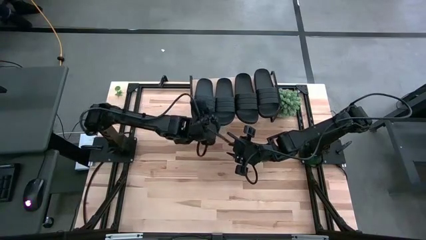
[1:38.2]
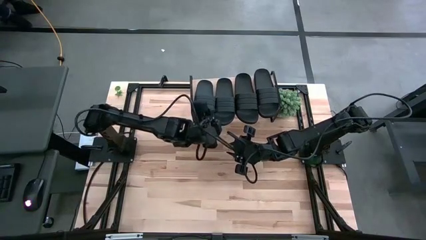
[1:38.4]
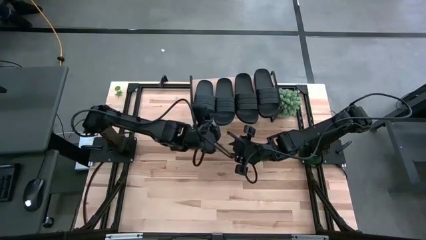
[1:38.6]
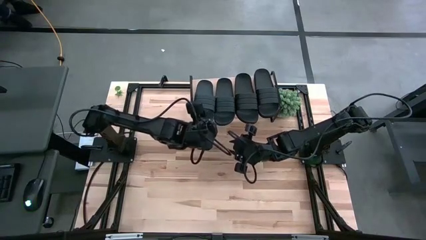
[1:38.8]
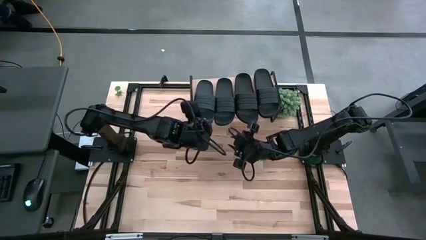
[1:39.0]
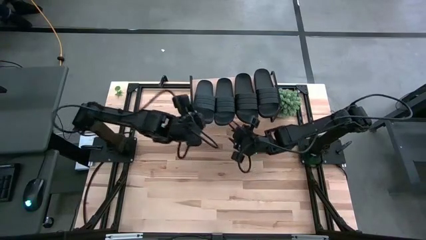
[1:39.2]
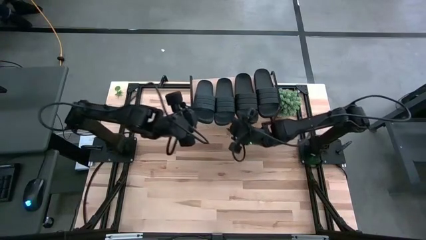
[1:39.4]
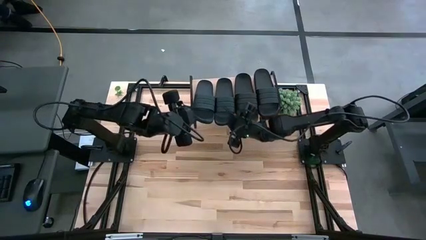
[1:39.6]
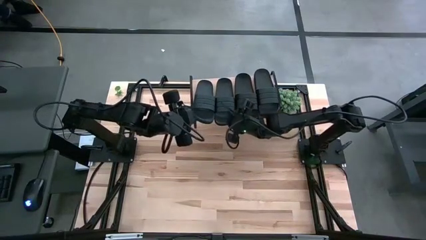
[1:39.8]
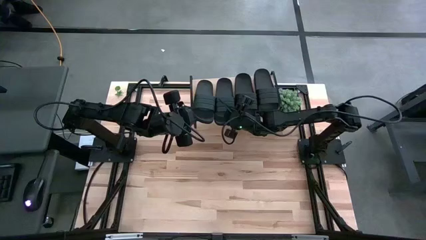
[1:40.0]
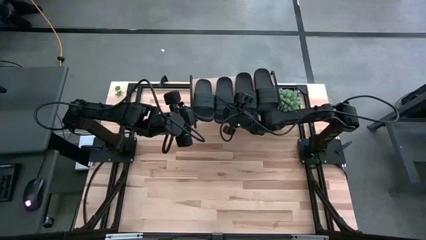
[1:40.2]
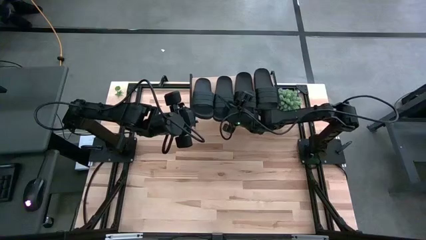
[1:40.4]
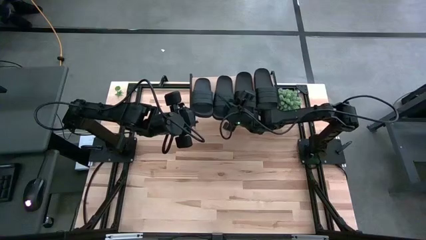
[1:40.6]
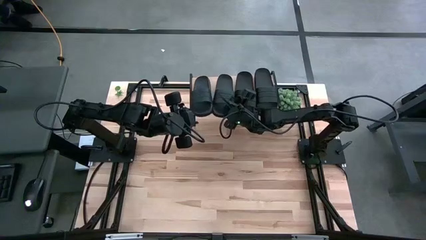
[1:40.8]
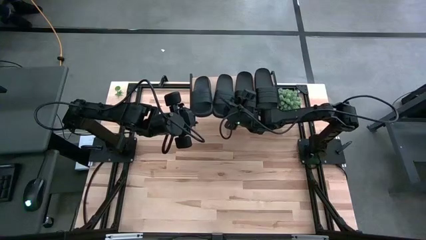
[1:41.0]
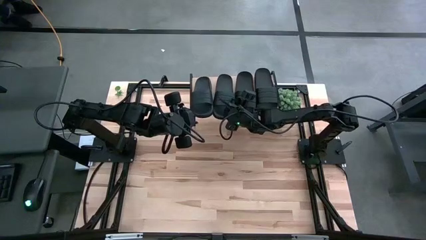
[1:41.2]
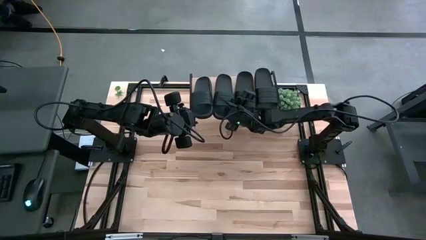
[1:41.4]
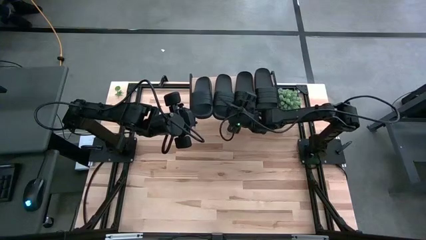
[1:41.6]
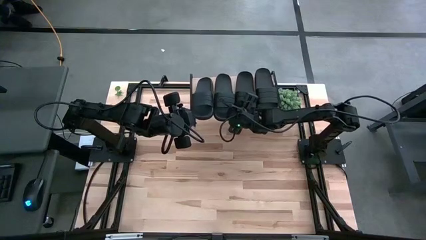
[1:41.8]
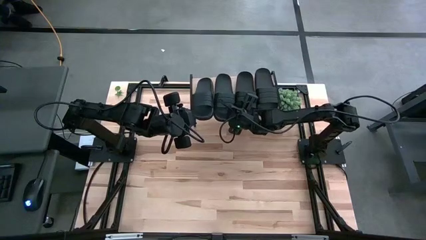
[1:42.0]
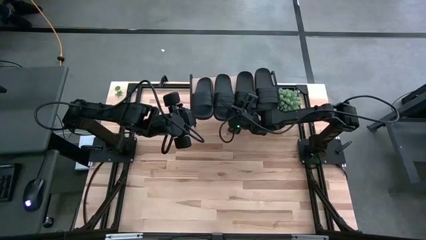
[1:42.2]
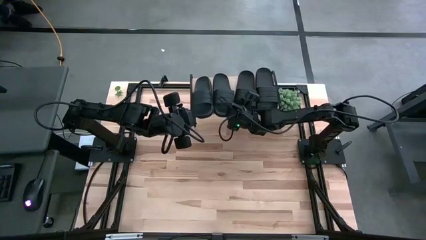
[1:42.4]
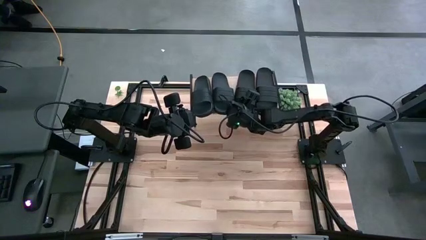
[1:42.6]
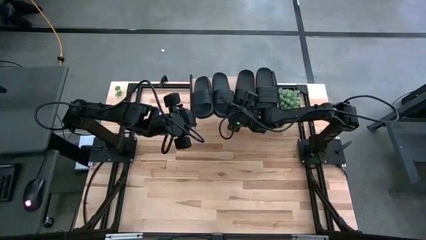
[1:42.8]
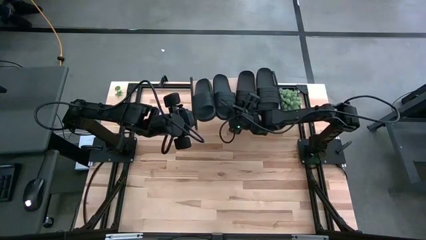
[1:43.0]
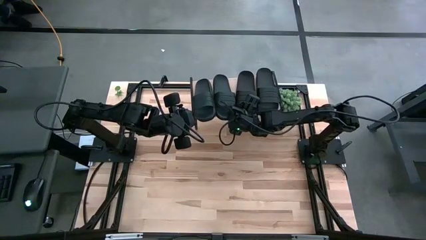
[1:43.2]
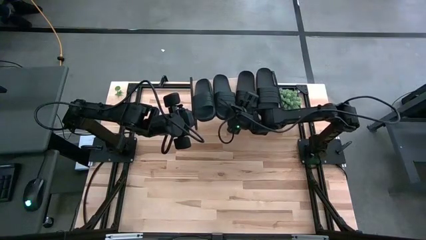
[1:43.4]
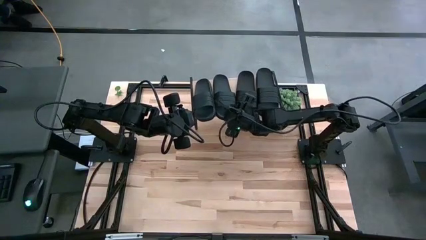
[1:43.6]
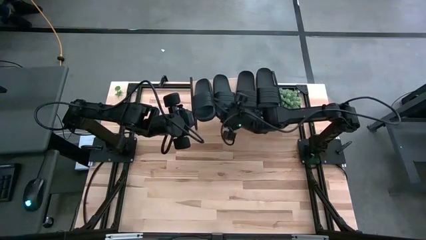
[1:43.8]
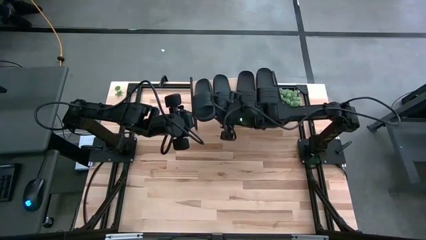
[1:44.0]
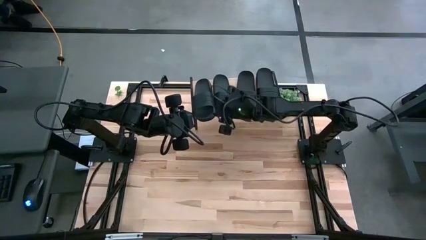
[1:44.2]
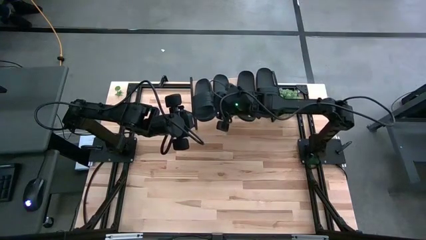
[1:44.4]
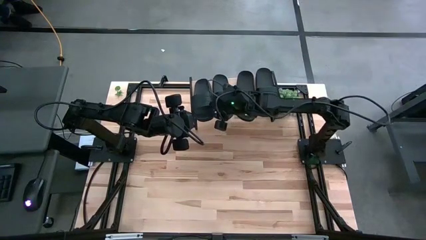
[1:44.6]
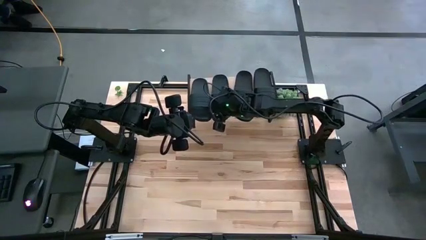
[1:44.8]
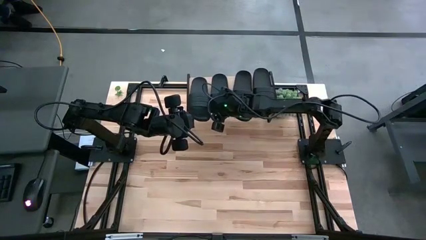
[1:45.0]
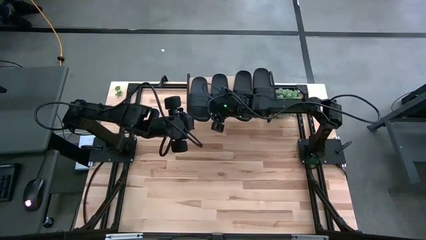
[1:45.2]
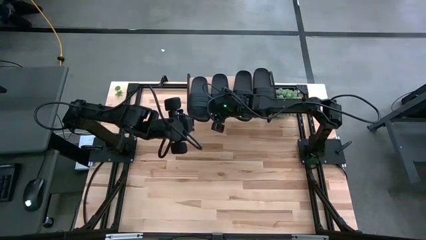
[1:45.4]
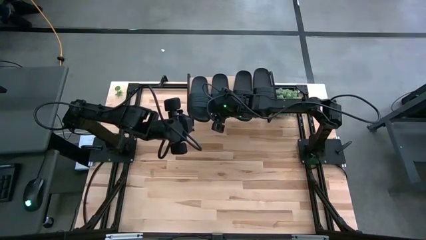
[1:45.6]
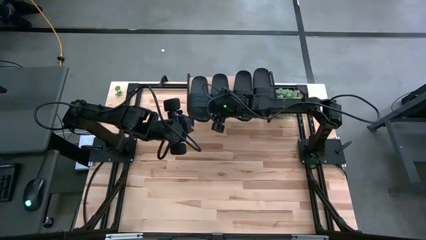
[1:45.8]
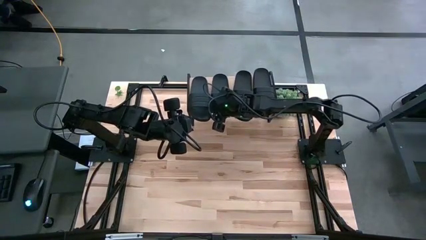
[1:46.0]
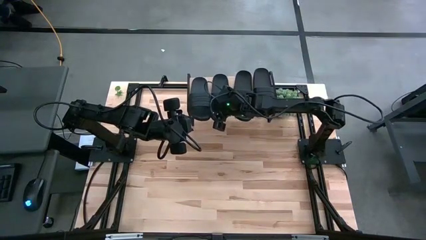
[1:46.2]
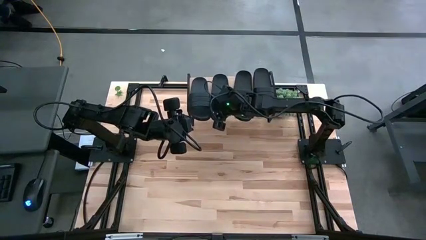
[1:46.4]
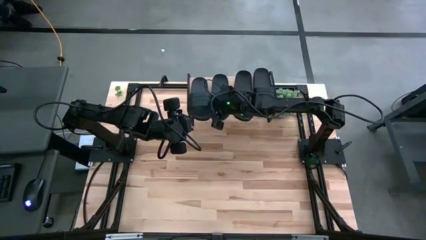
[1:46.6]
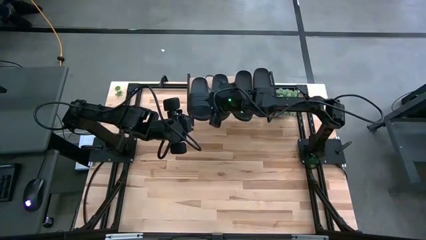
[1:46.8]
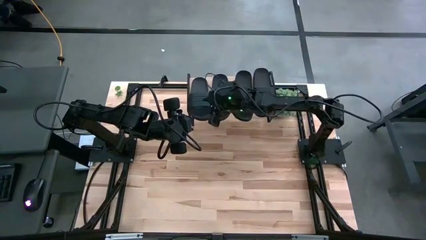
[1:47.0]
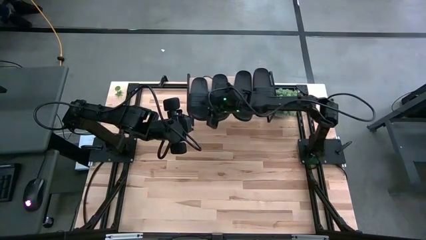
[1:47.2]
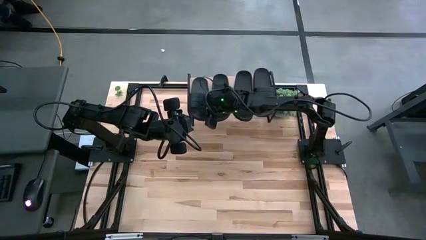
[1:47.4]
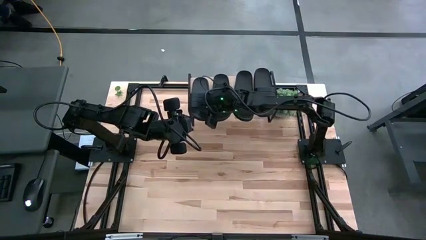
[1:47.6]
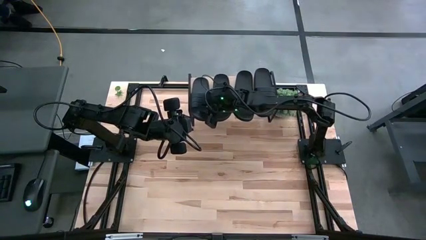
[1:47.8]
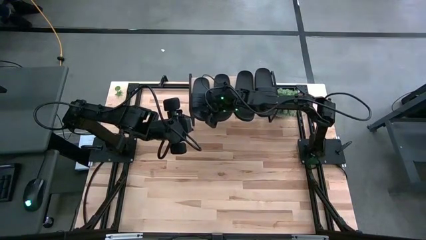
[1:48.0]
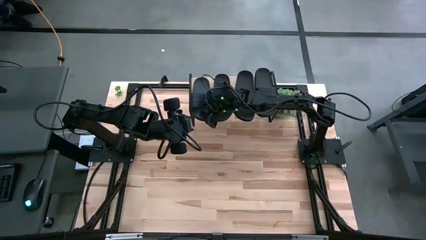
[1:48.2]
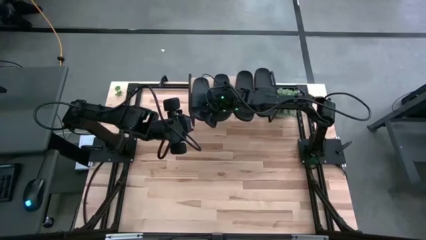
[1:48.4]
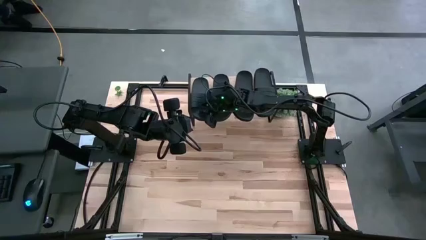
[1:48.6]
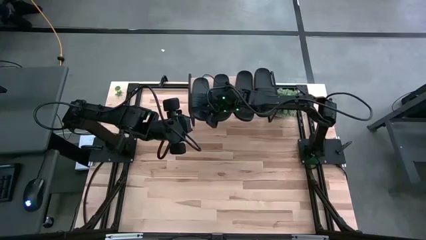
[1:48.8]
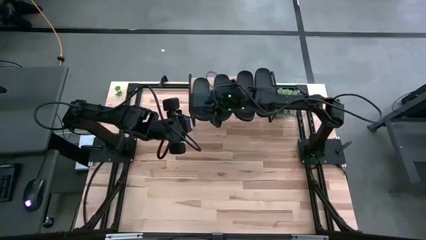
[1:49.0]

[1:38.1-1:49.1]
Task: Pick and place slides into the shelf
Adjust the black slippers on the shelf

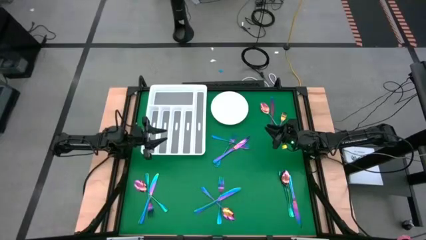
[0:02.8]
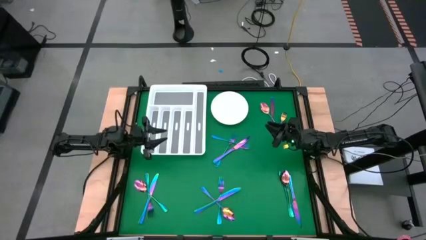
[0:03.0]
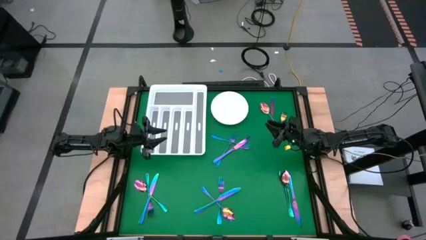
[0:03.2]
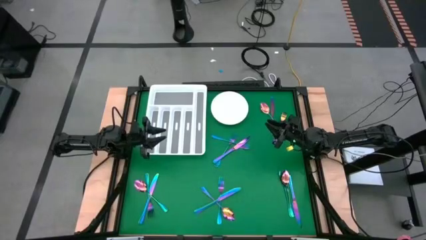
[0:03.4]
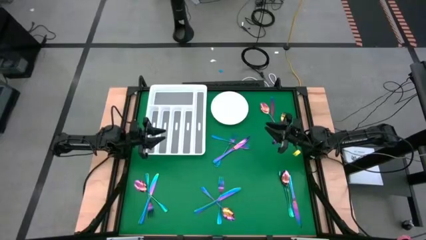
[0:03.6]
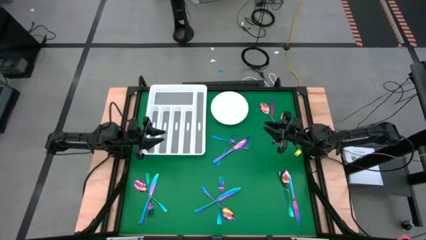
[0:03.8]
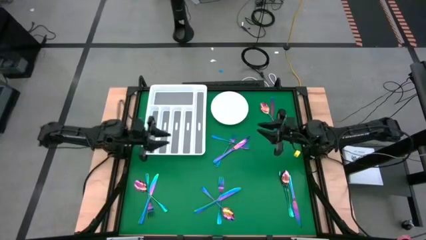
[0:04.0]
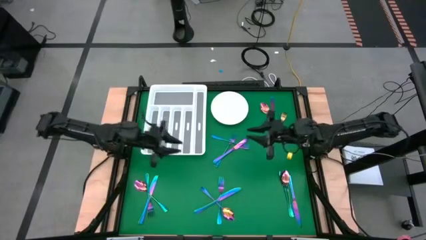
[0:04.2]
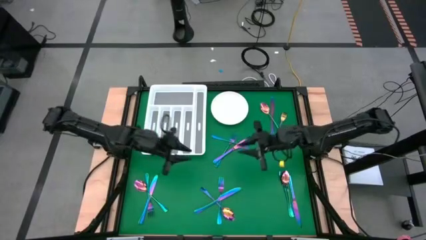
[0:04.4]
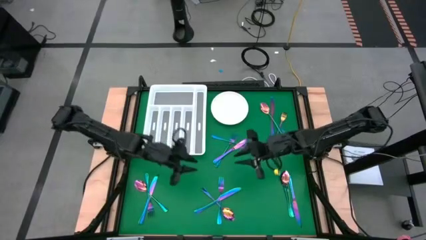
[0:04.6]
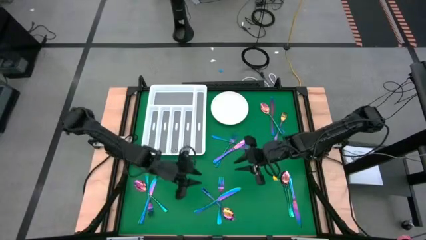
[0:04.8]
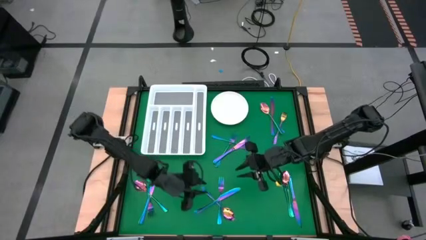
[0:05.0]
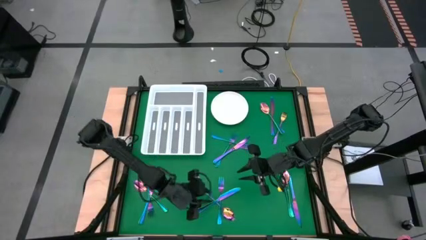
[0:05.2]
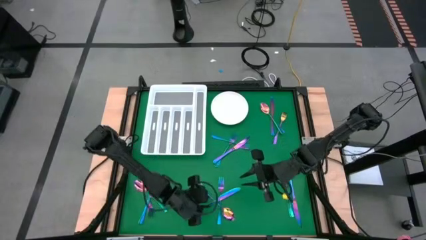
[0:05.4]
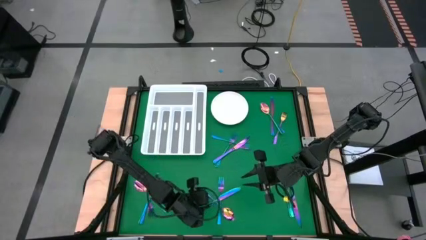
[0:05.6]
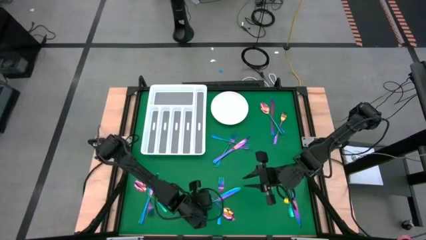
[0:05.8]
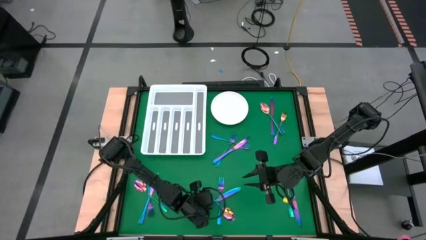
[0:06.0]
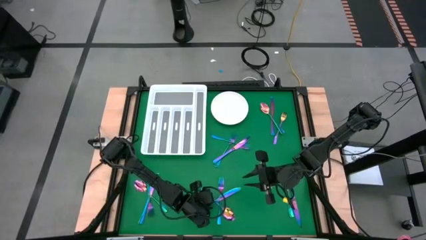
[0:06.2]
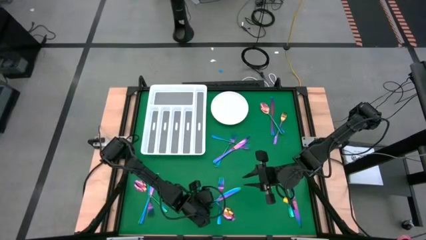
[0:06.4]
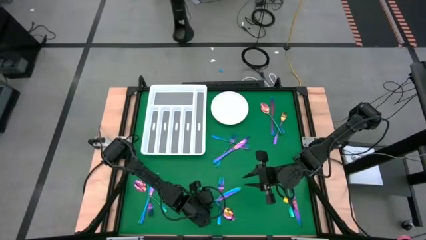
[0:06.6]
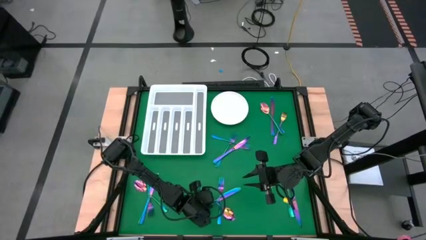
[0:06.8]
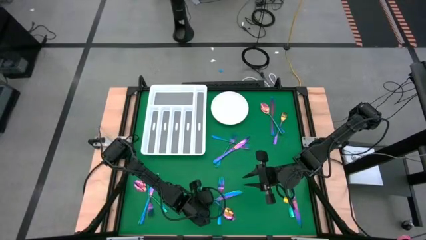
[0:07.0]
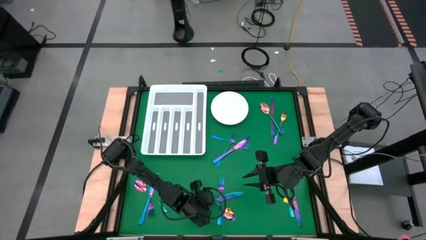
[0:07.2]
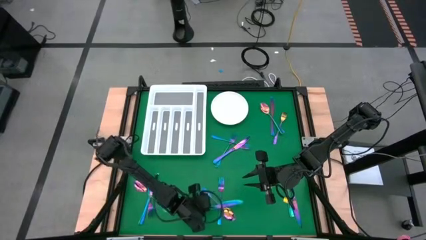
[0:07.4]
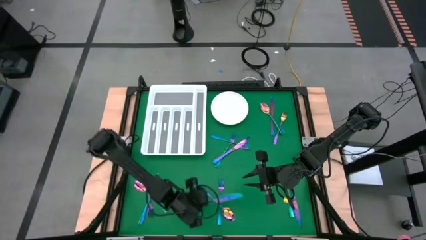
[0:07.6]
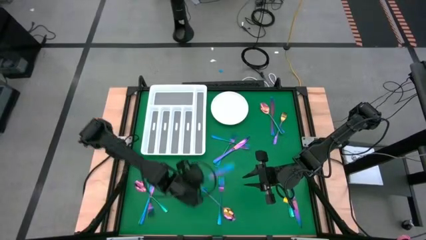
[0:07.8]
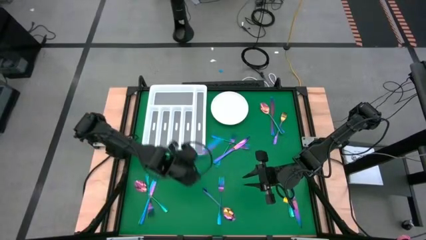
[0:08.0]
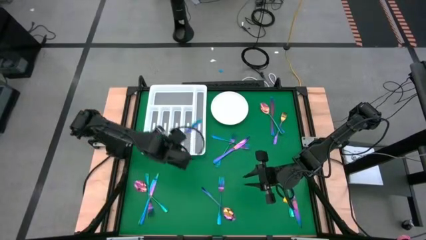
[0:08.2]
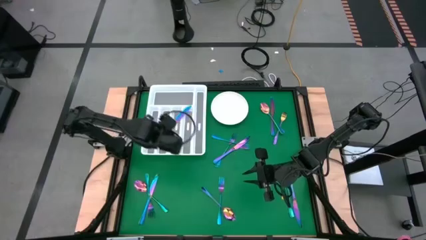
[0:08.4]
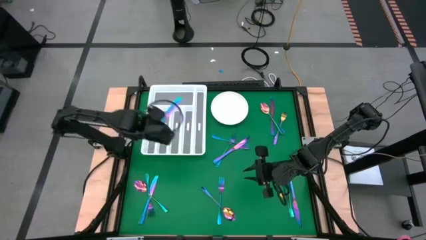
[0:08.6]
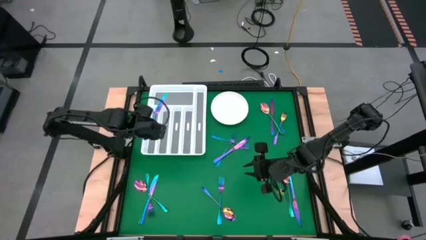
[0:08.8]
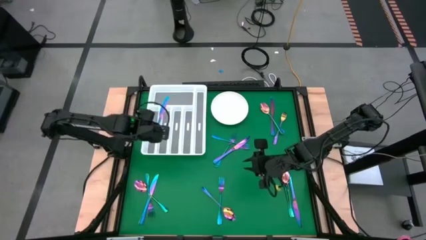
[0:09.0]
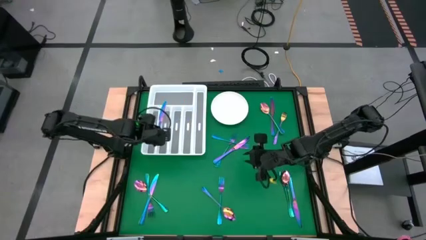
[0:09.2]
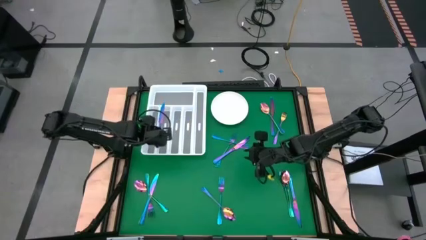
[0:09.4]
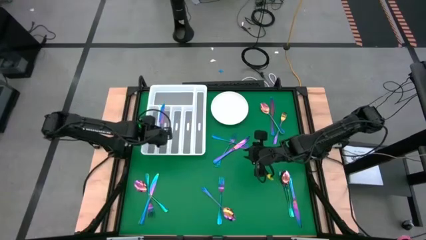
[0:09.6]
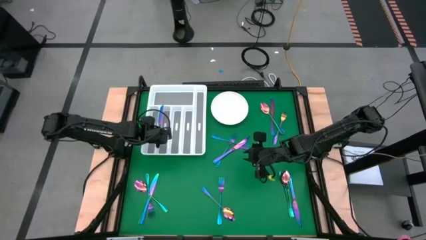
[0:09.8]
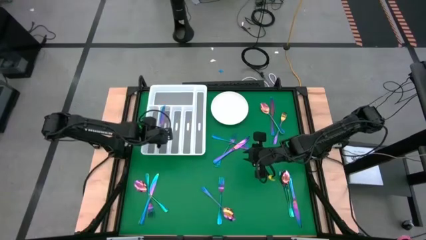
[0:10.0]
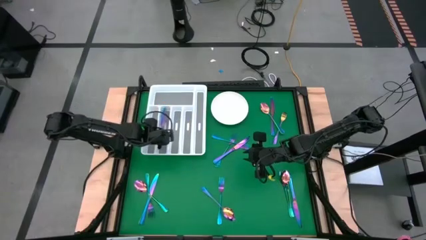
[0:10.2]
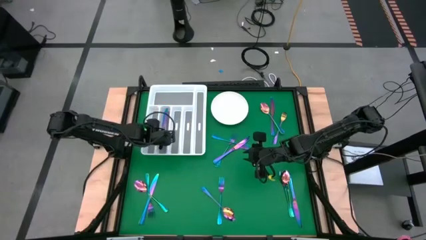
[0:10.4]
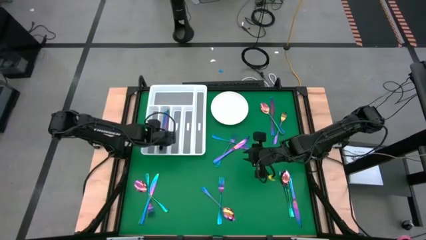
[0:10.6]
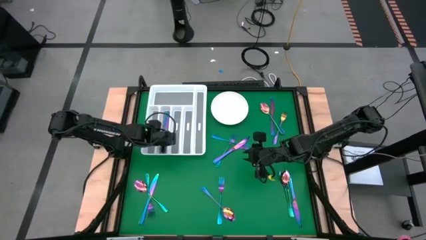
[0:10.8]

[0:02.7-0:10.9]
Task: Sort silverware
Put the blue knife into the silverware tray
